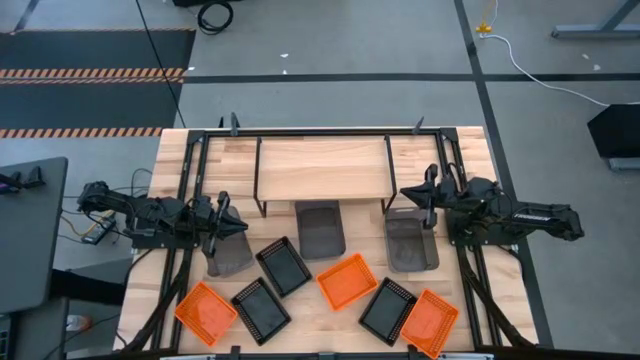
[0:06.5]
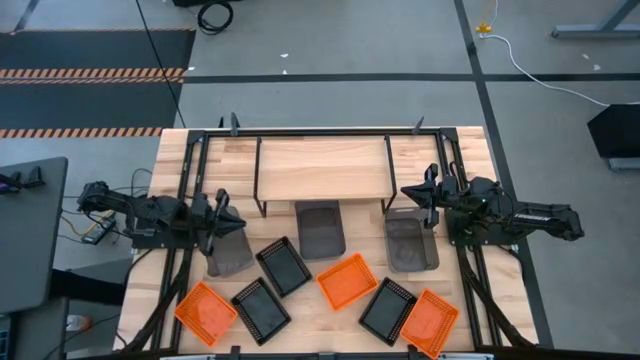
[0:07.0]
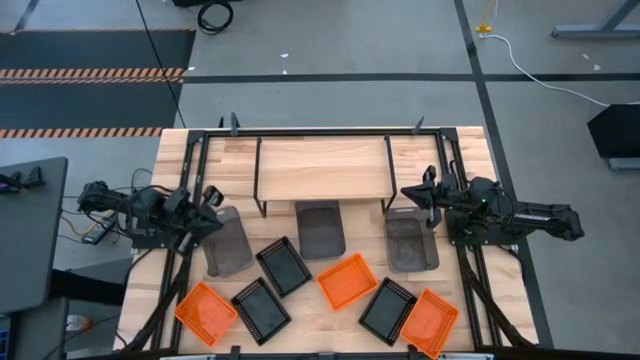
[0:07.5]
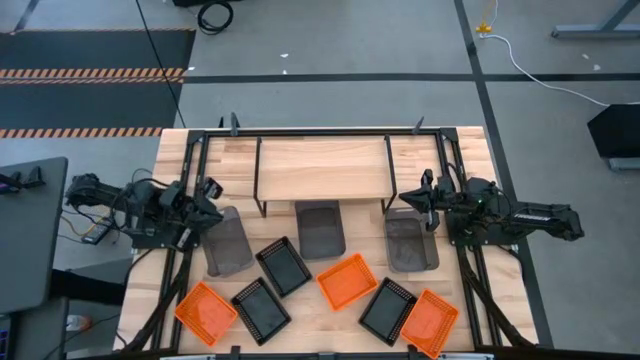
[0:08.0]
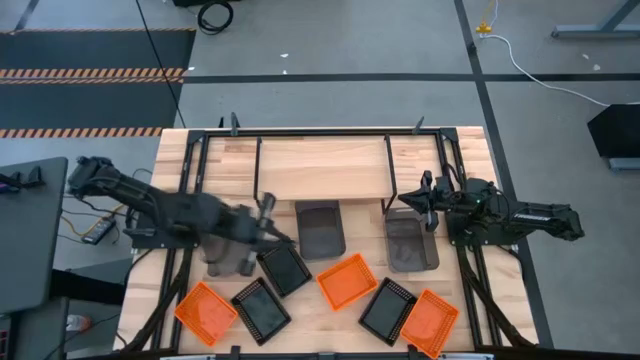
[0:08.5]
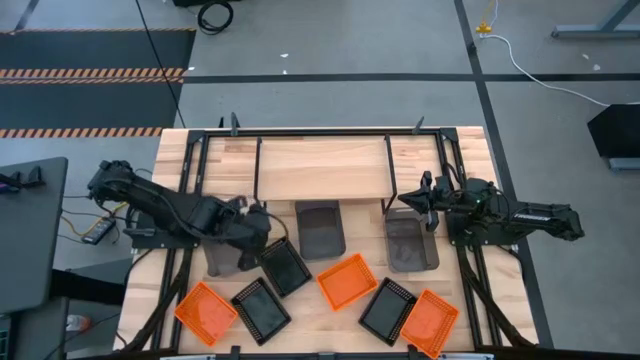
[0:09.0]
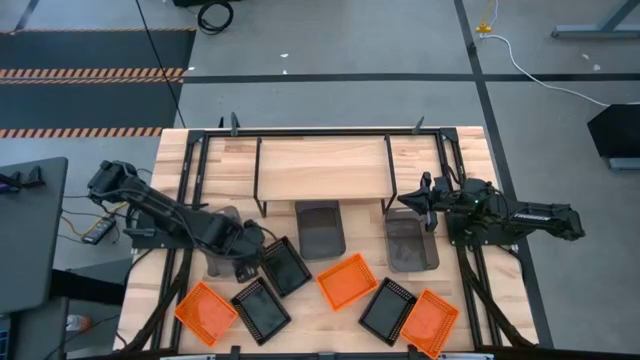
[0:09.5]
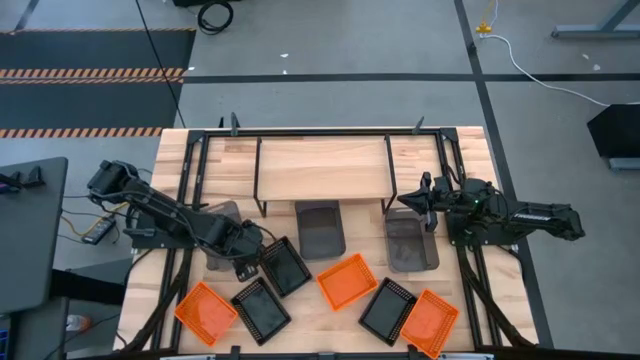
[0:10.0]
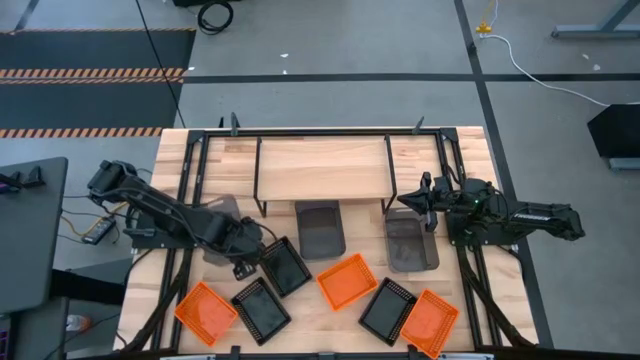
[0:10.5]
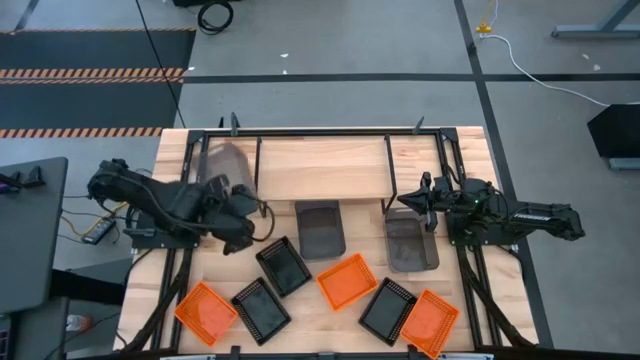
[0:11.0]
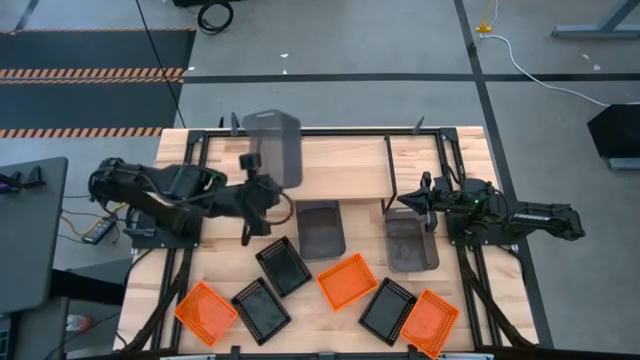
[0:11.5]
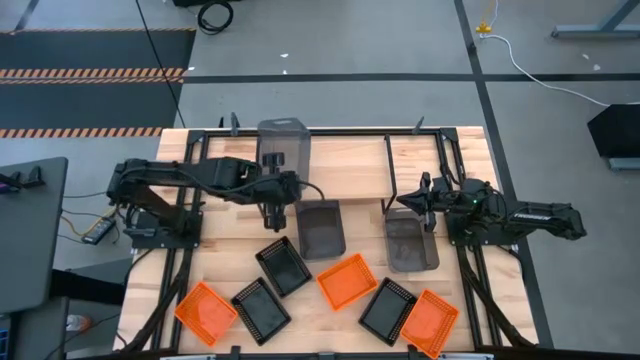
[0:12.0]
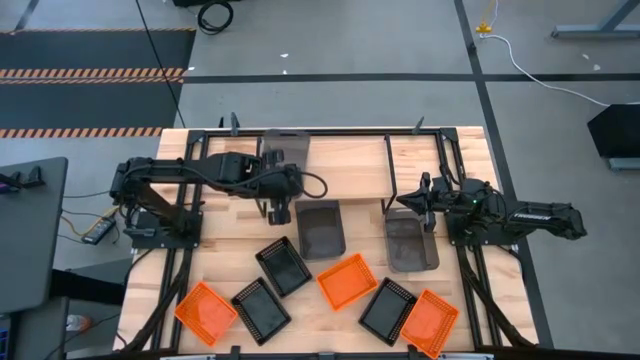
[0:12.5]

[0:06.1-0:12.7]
Task: Stack baskets on shelf by color
Put the left gray bin on the shelf

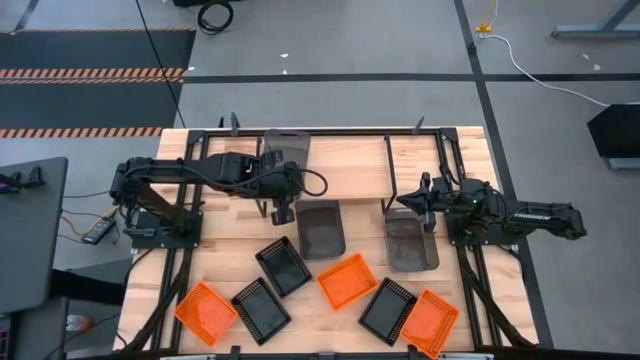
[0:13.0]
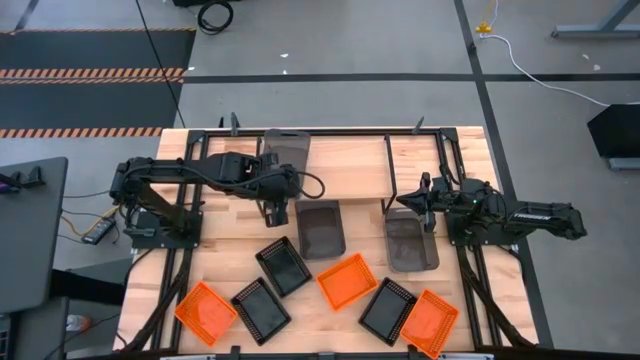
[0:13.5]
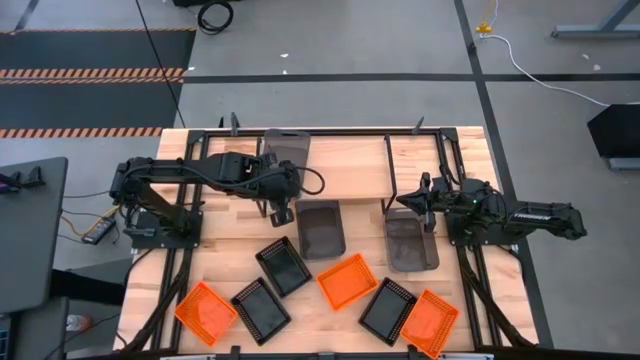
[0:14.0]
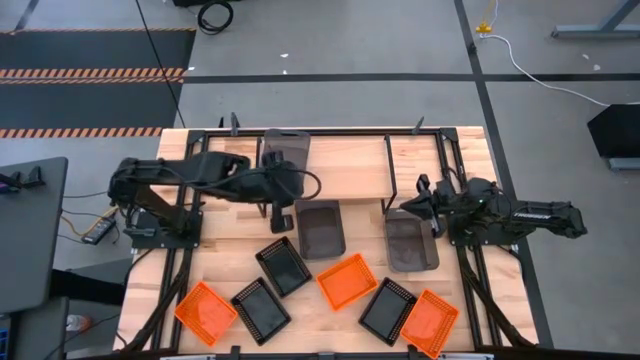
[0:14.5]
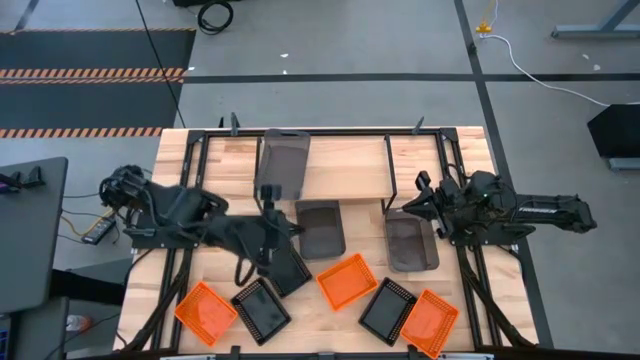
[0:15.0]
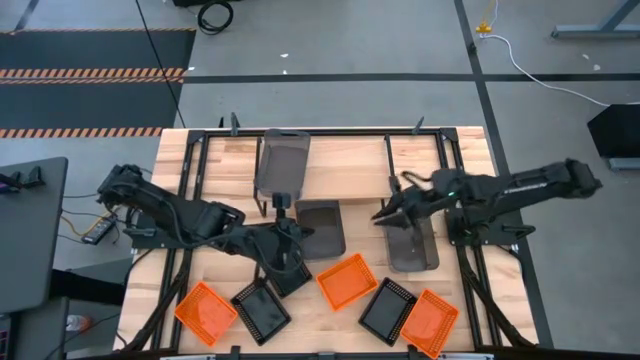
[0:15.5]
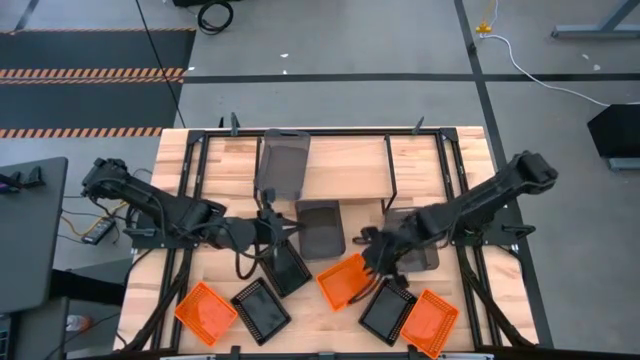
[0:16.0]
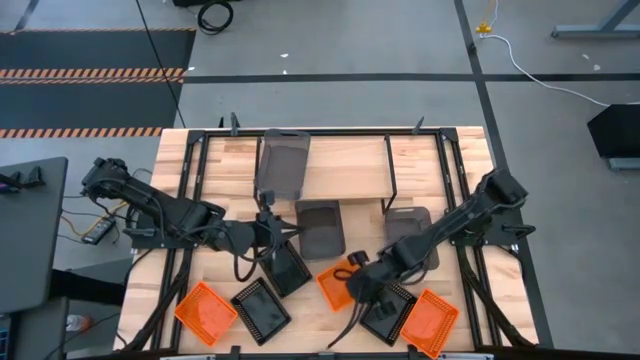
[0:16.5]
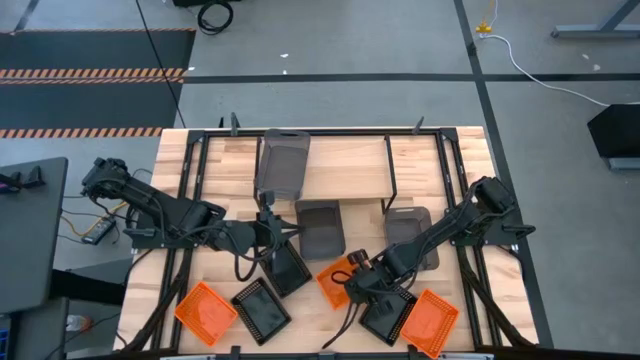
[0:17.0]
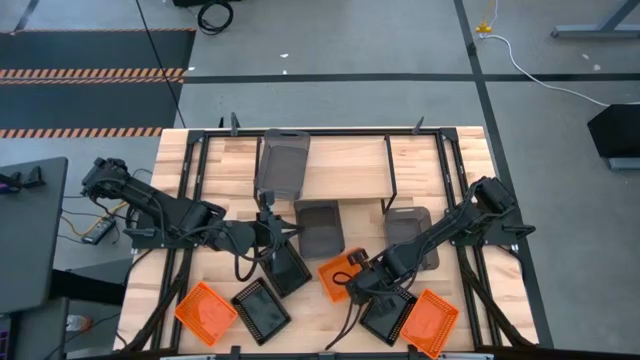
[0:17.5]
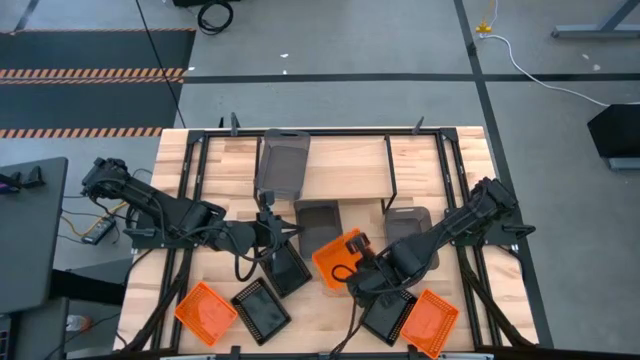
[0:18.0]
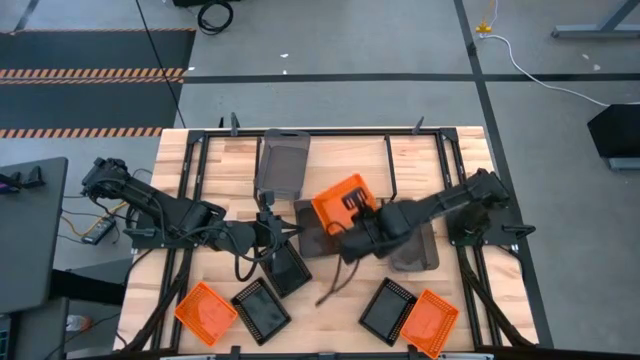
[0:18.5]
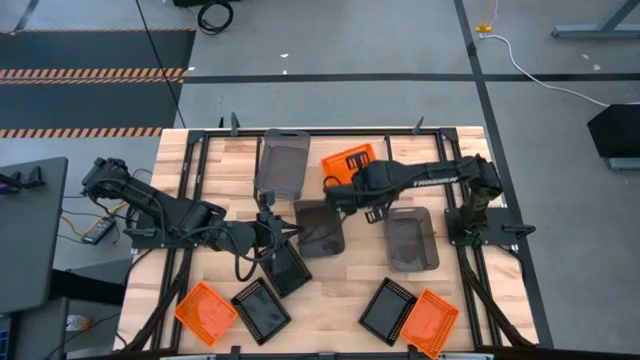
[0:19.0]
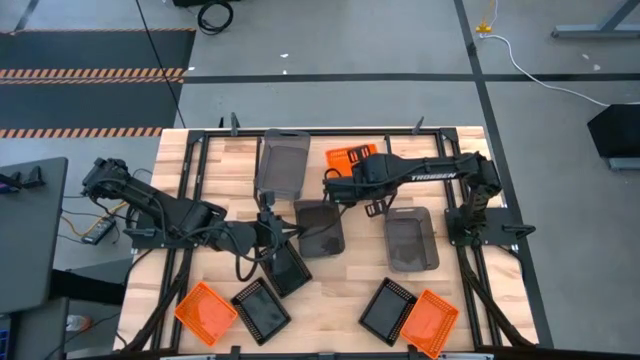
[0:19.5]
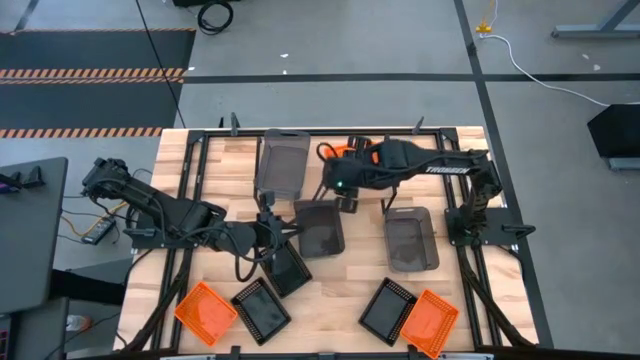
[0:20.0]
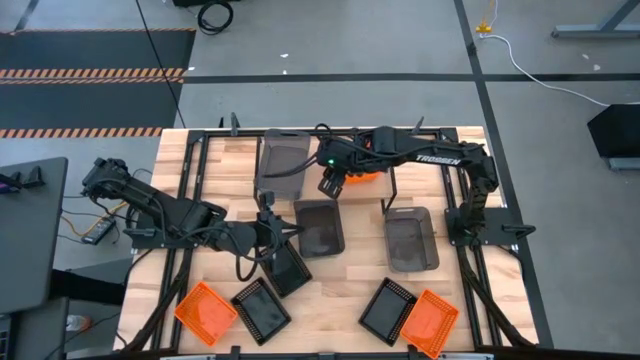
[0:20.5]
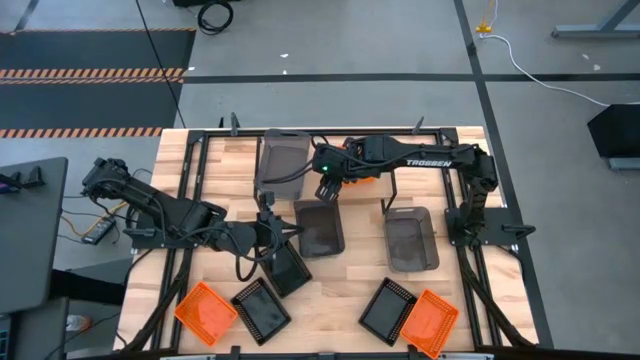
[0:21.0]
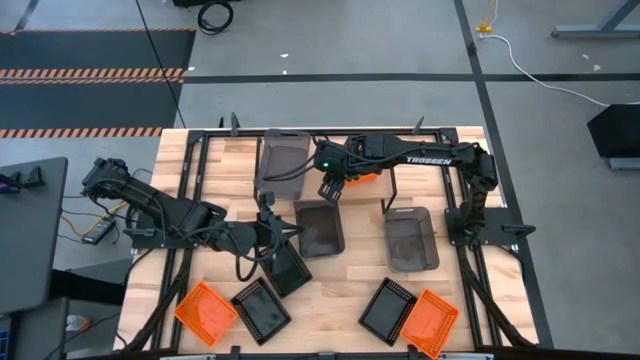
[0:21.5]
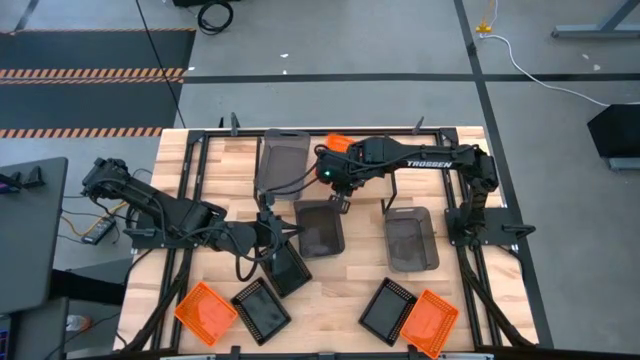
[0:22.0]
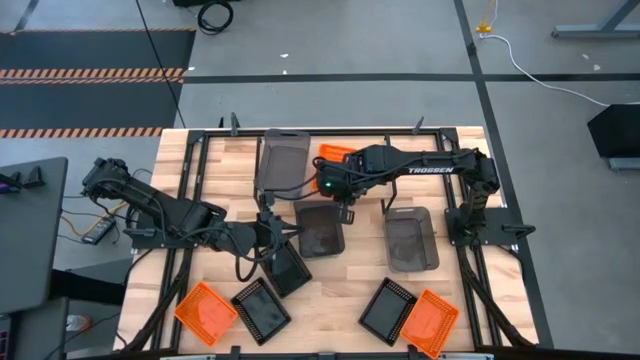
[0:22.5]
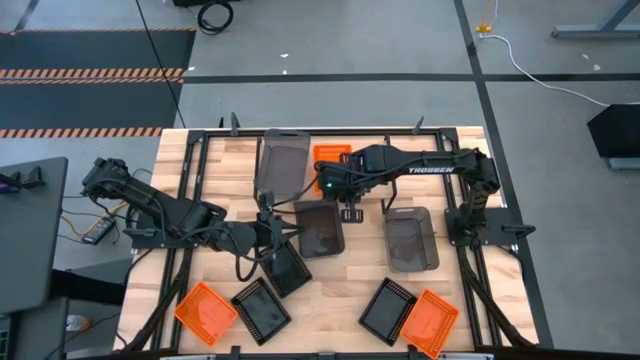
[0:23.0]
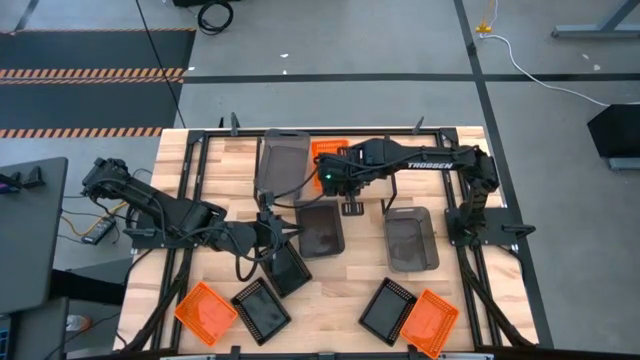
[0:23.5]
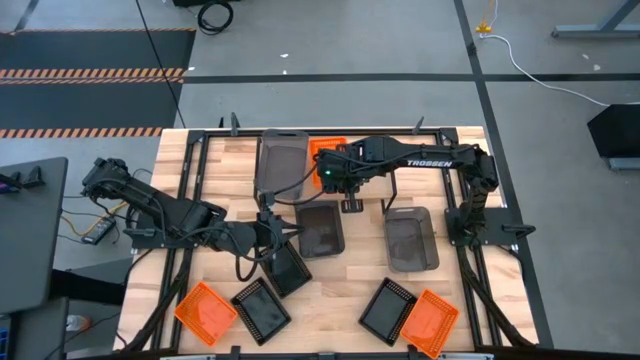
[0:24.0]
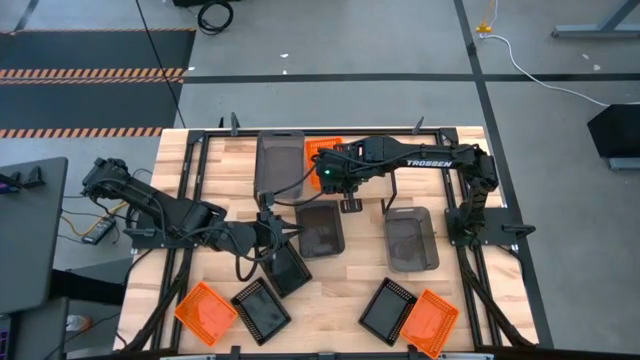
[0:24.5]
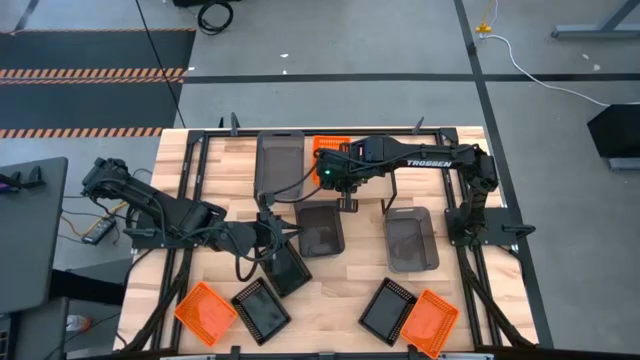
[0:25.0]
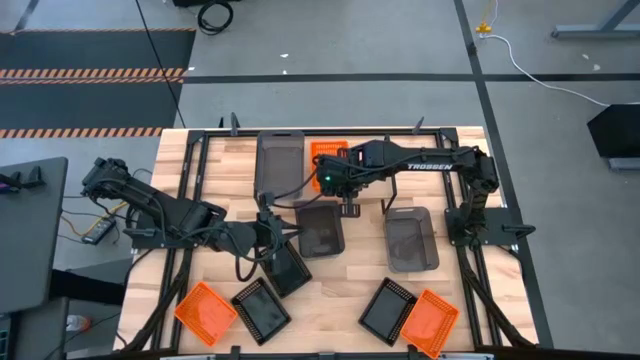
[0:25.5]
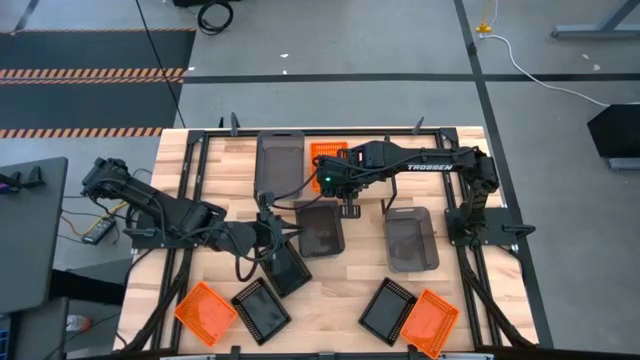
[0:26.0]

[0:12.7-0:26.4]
Put the middle orange bin on the shelf
